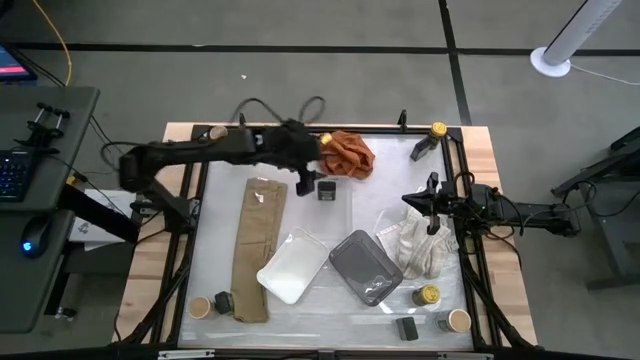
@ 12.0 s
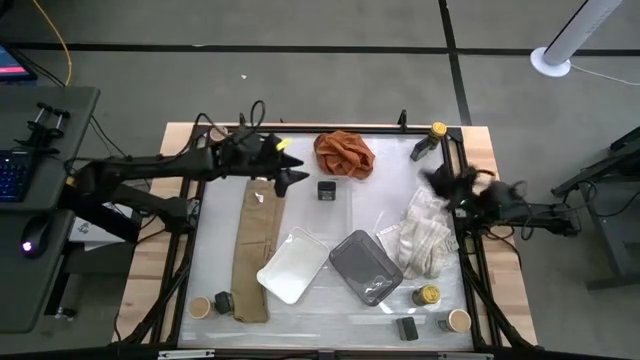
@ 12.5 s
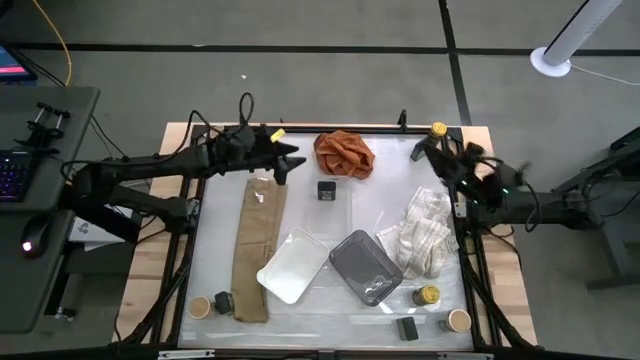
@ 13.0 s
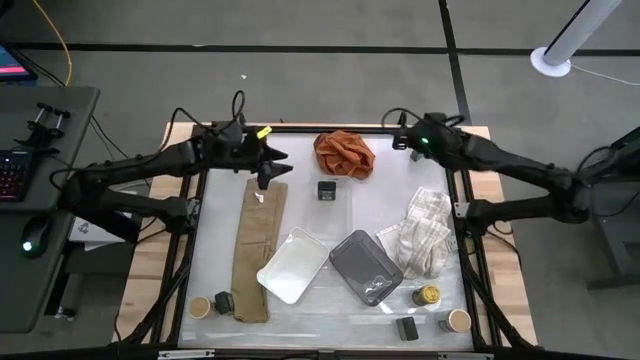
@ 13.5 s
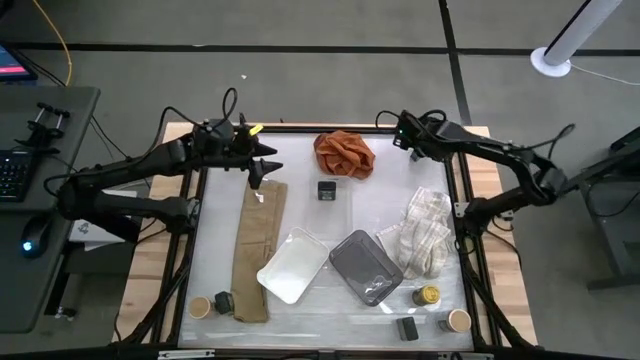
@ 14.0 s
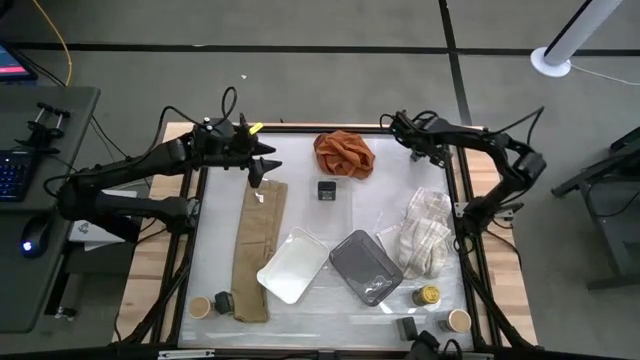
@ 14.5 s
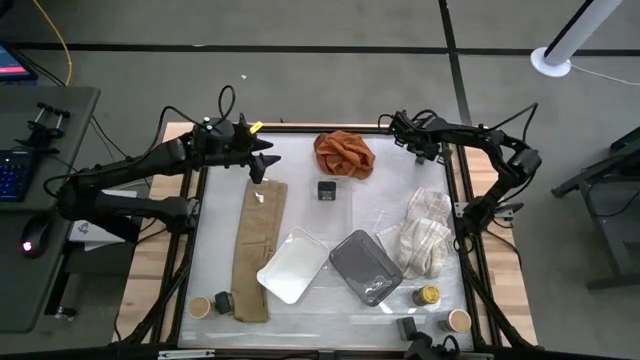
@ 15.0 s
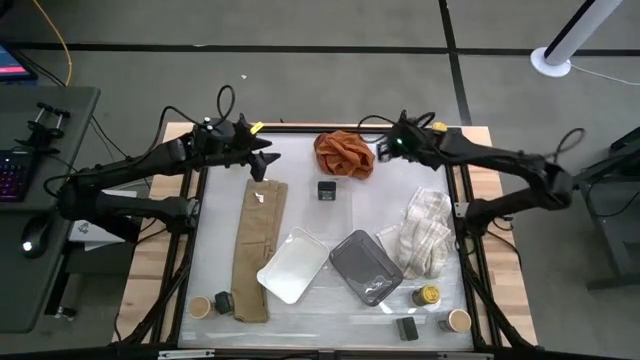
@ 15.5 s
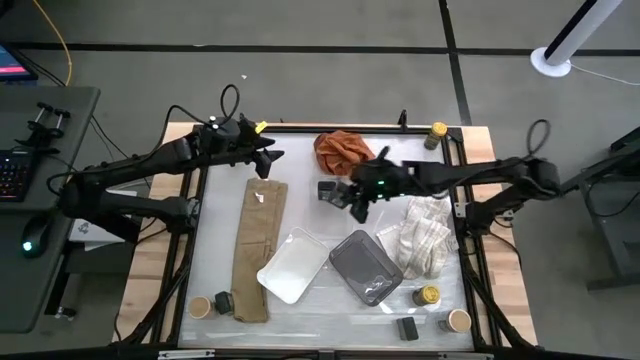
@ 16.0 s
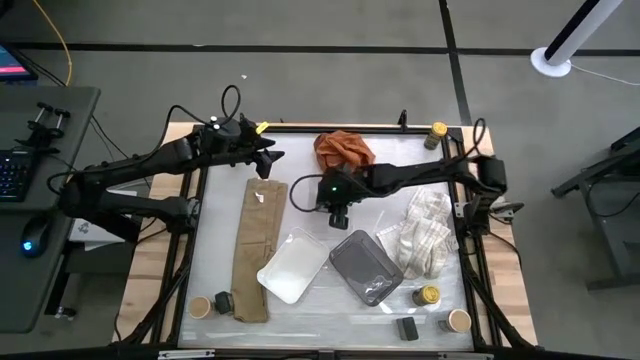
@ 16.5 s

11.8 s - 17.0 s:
Task: Sort spices by type
Put the green seasoning can into the transparent bin

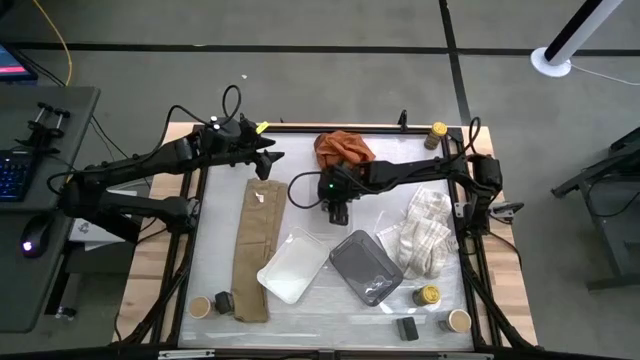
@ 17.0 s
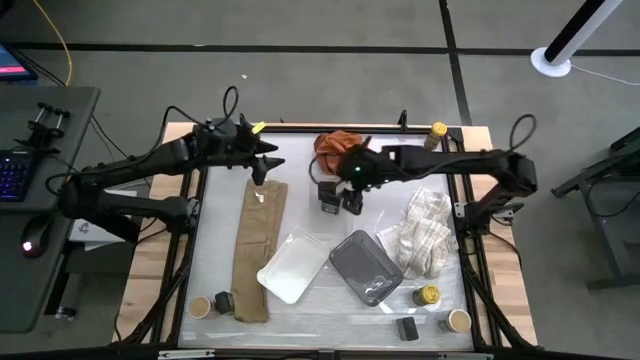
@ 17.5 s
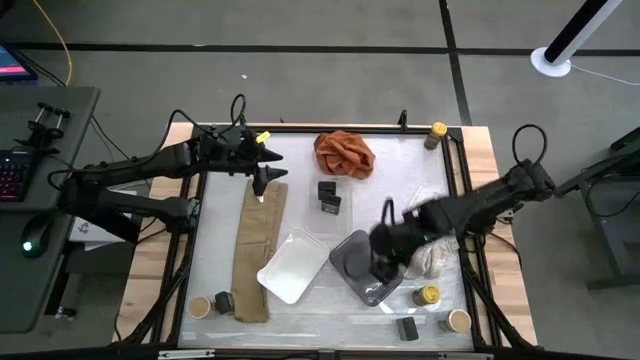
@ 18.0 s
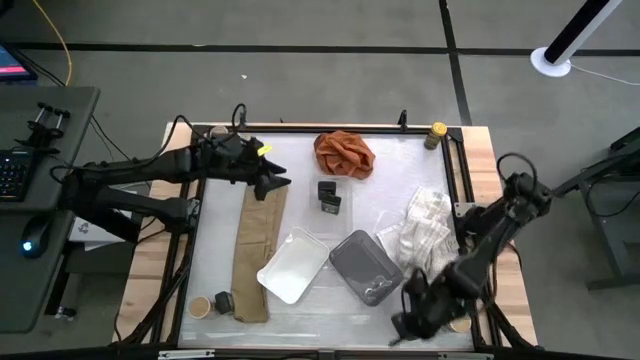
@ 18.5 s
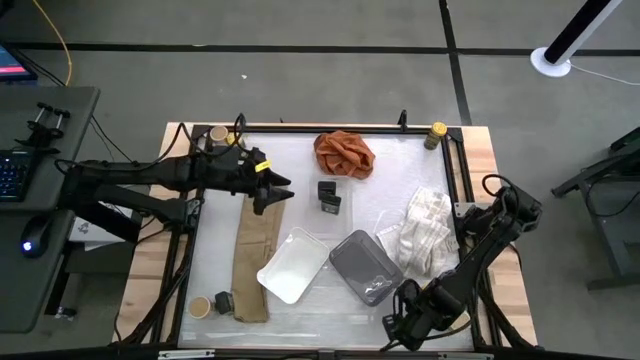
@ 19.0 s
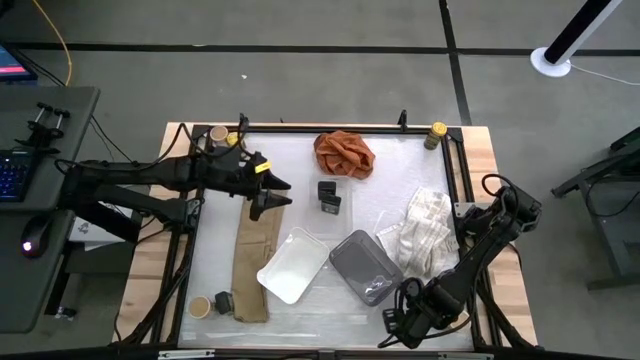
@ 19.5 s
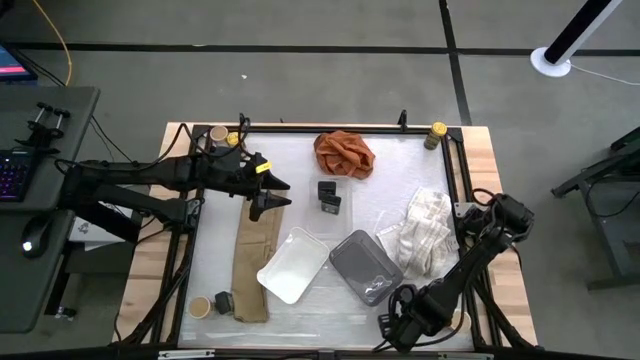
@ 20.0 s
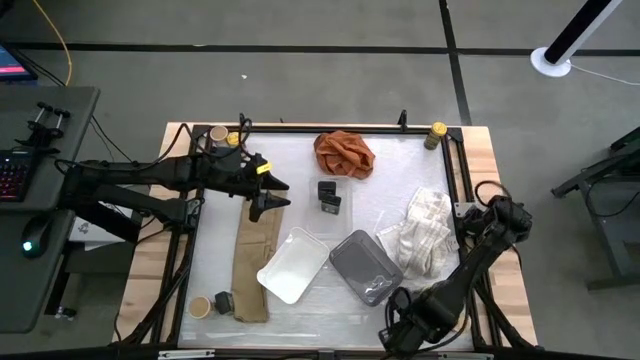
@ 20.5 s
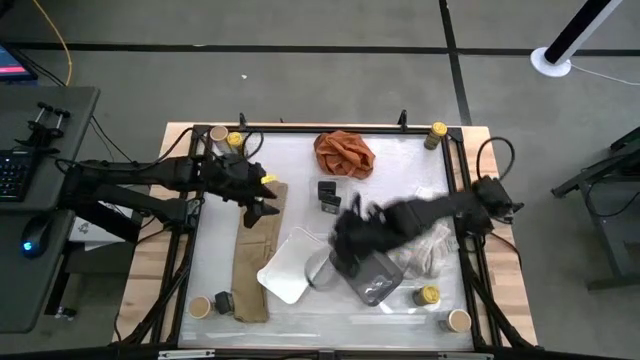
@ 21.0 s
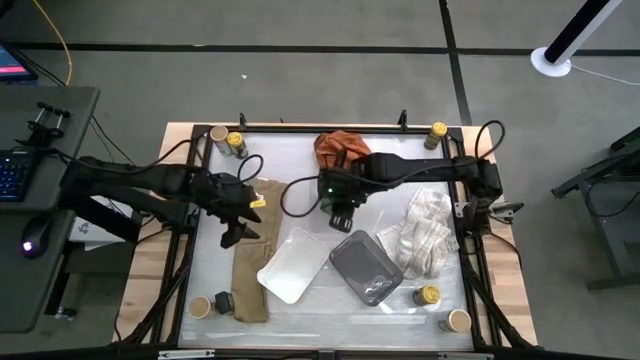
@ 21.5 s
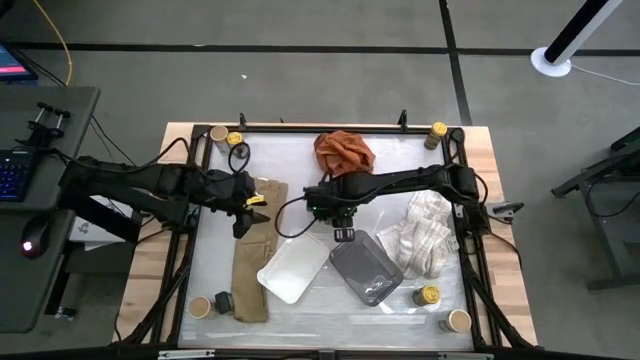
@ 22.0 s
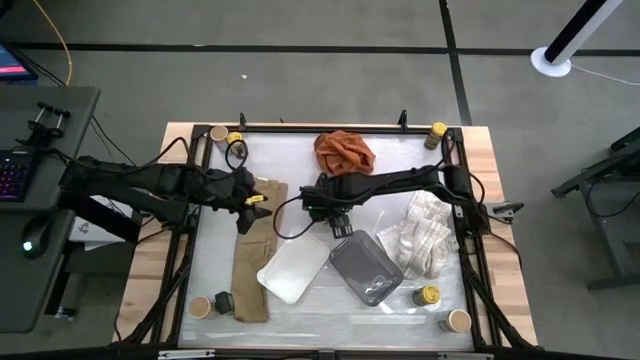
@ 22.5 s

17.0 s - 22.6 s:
Put the green seasoning can into the transparent bin

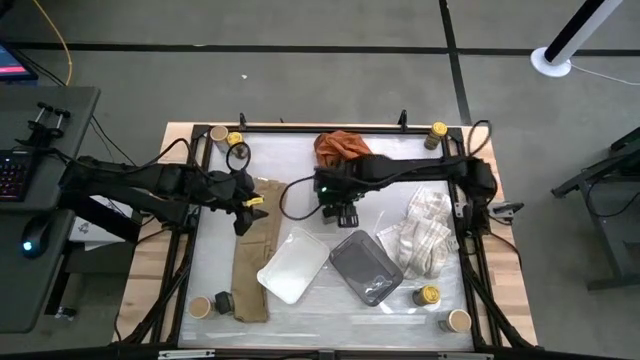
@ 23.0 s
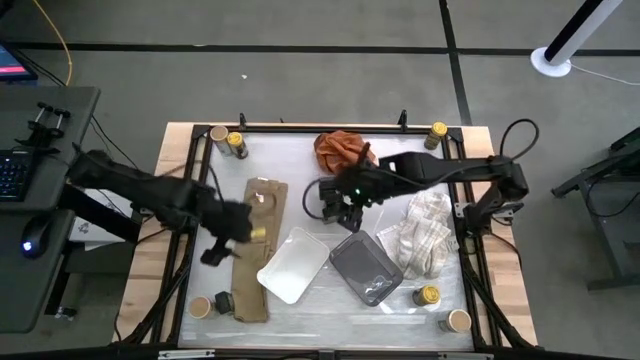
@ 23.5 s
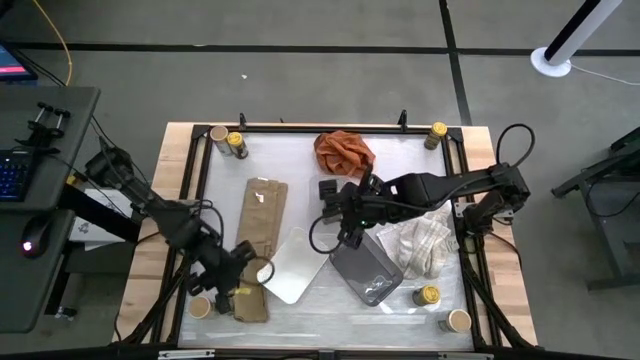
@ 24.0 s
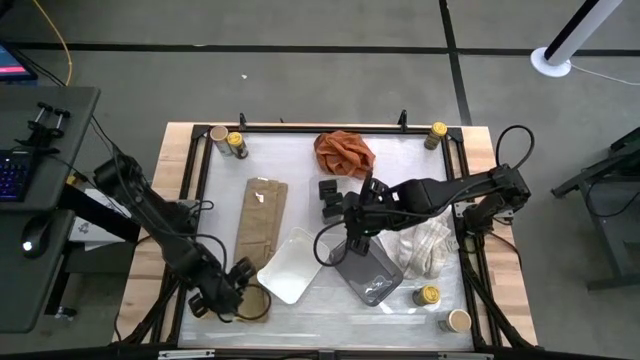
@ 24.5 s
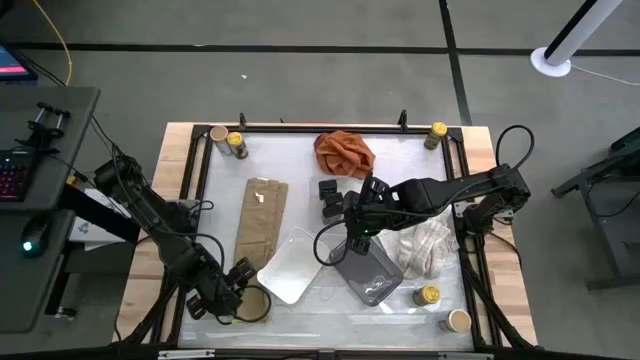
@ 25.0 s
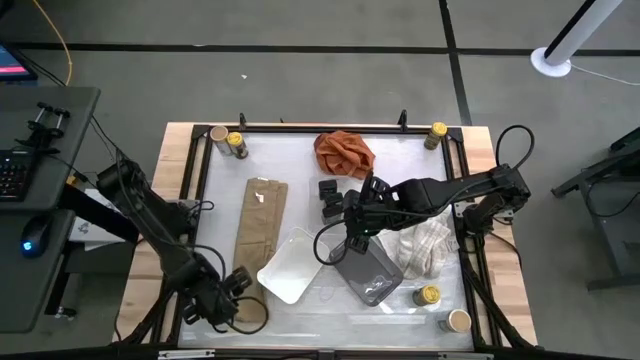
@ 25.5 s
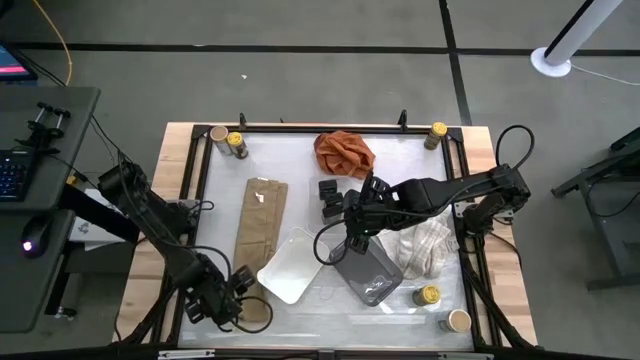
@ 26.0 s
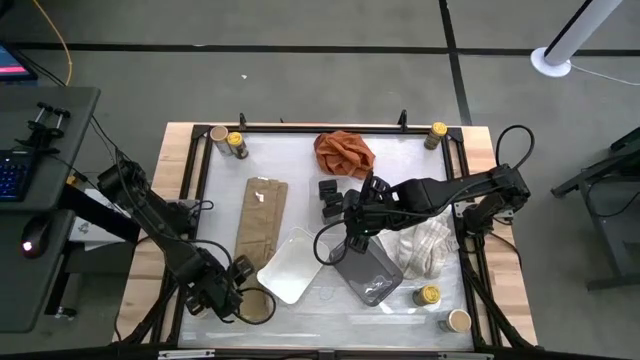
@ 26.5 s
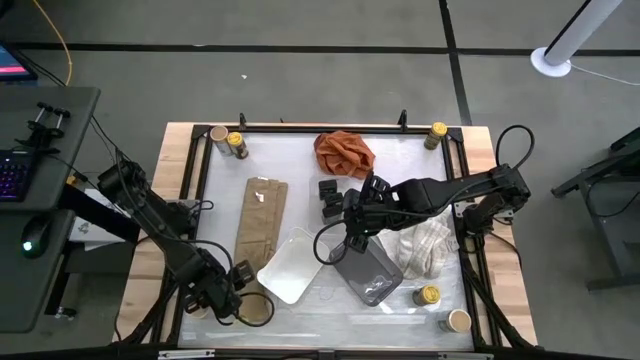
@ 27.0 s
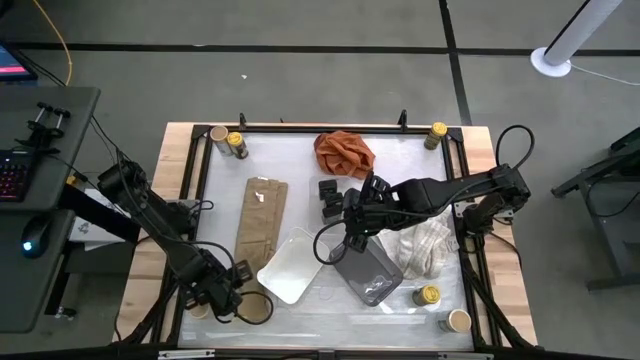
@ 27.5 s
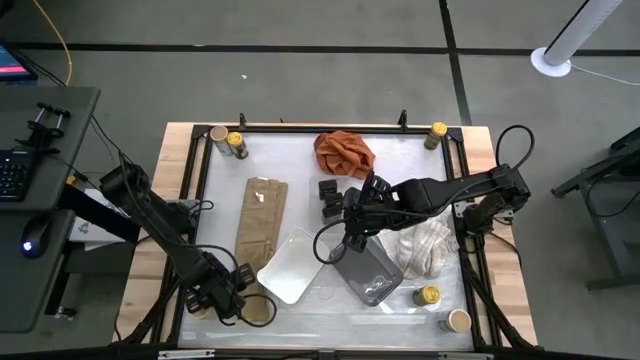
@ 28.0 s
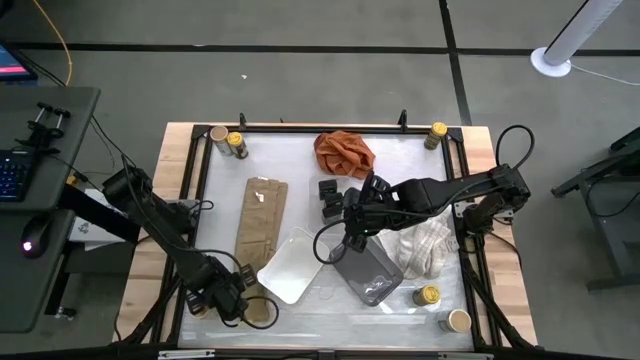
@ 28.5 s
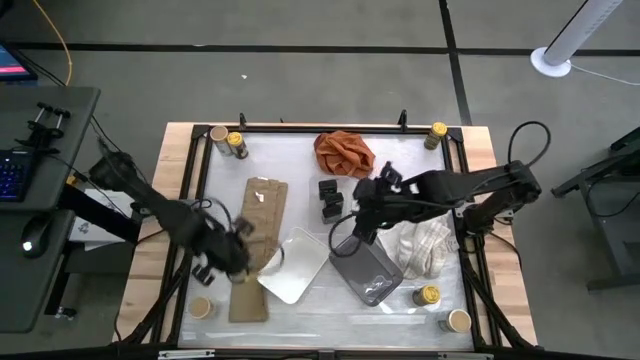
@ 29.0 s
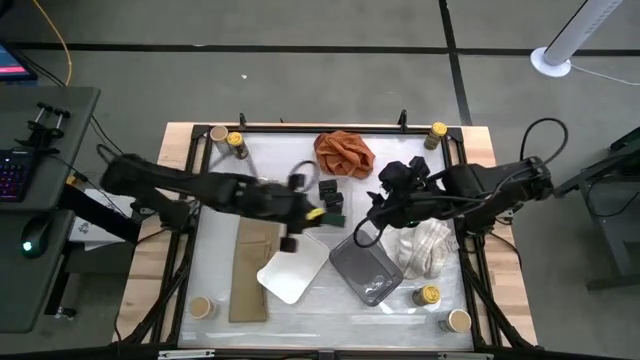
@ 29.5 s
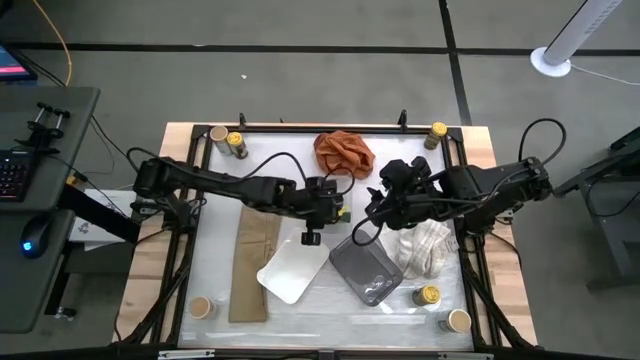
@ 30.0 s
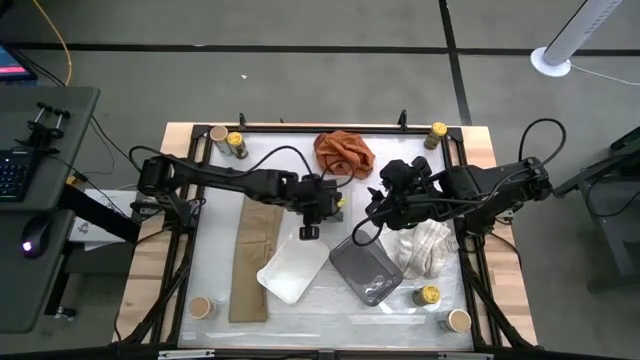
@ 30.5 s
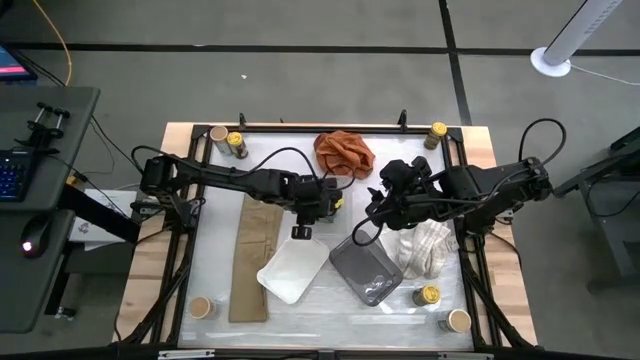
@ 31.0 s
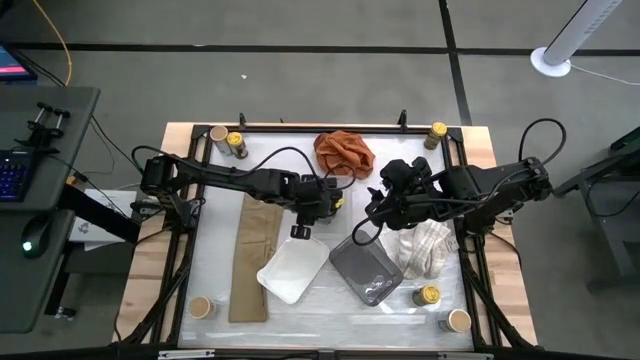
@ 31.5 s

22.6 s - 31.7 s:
Put the green seasoning can into the transparent bin
